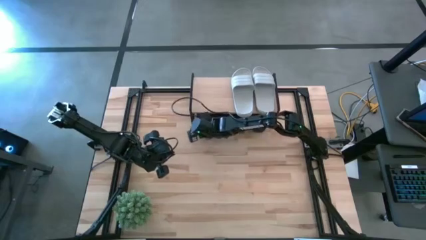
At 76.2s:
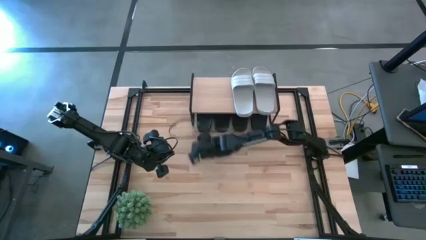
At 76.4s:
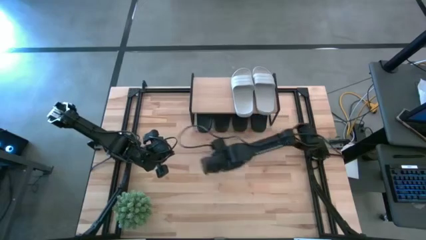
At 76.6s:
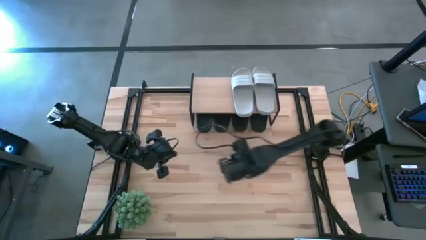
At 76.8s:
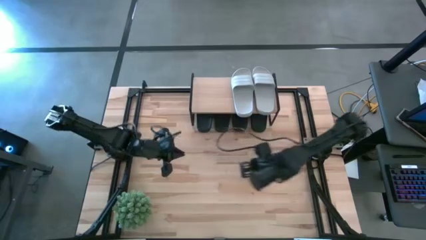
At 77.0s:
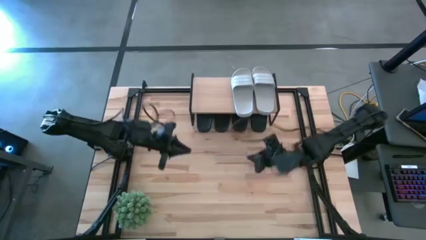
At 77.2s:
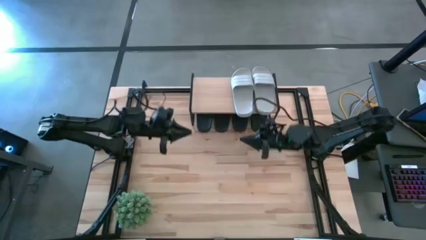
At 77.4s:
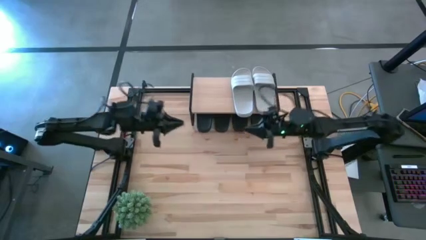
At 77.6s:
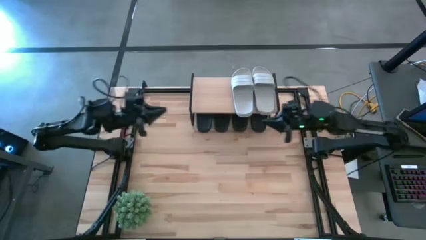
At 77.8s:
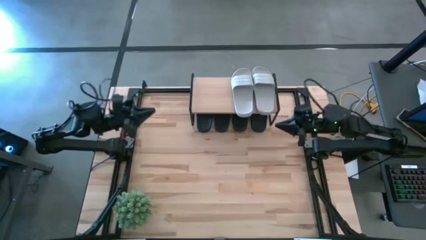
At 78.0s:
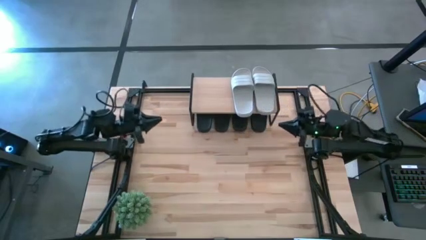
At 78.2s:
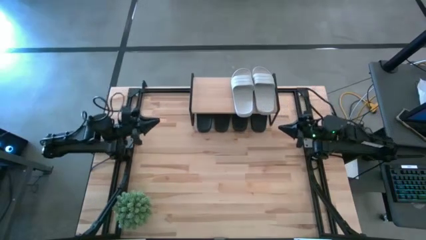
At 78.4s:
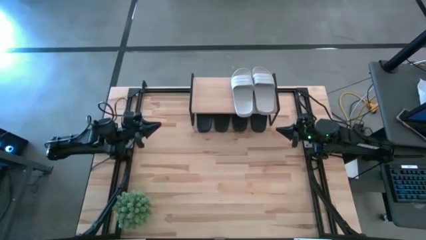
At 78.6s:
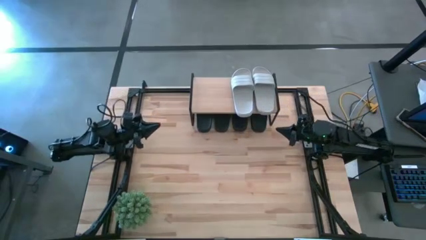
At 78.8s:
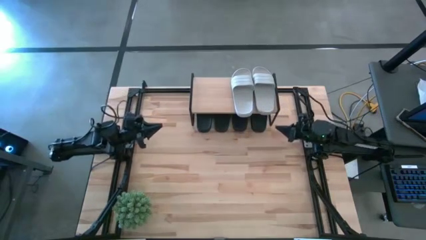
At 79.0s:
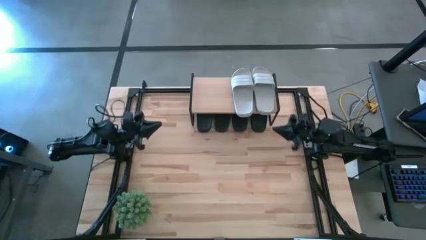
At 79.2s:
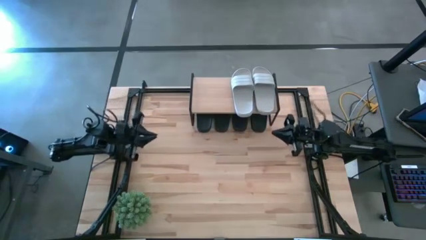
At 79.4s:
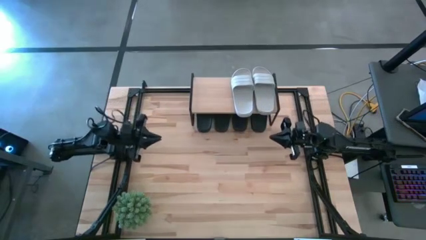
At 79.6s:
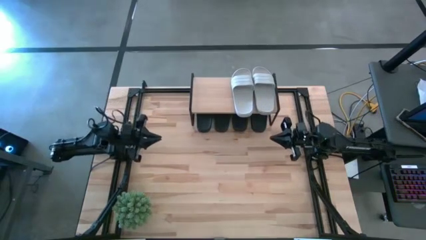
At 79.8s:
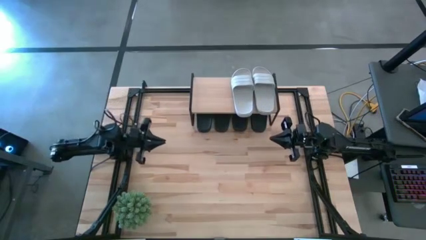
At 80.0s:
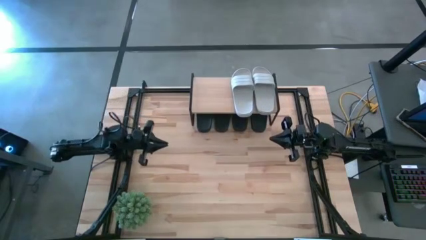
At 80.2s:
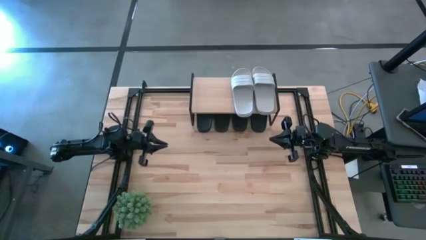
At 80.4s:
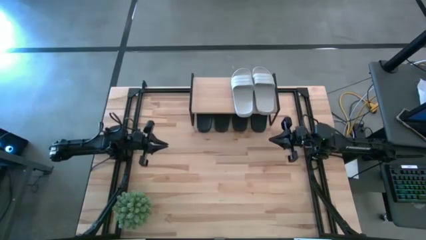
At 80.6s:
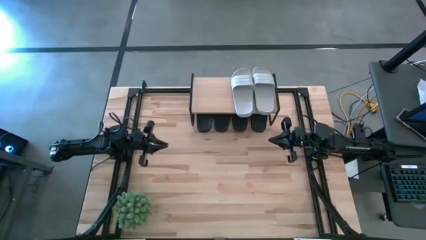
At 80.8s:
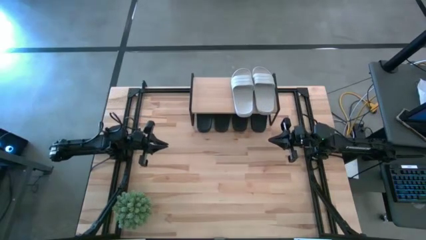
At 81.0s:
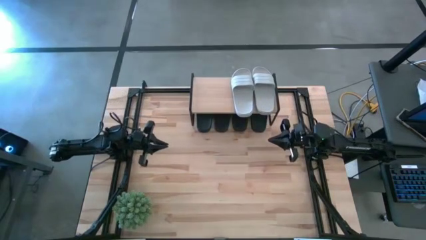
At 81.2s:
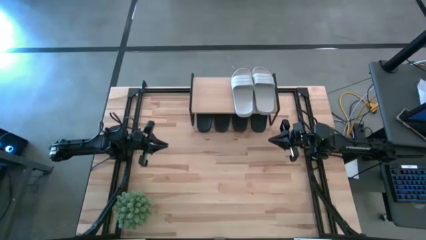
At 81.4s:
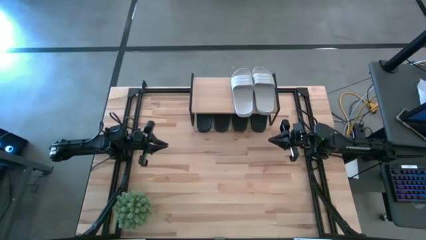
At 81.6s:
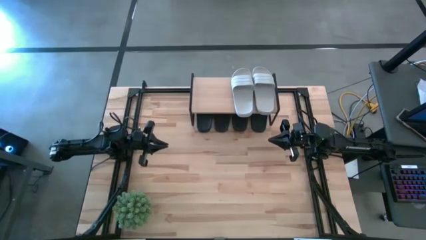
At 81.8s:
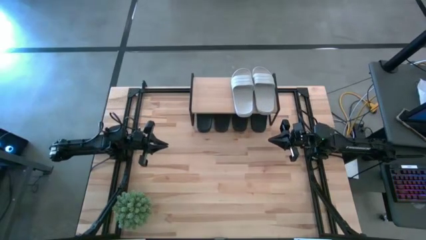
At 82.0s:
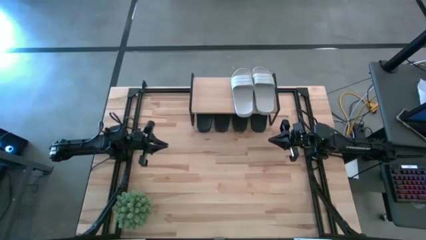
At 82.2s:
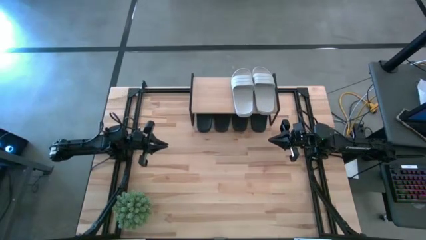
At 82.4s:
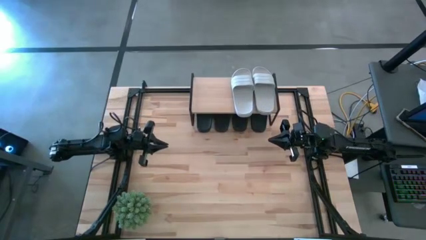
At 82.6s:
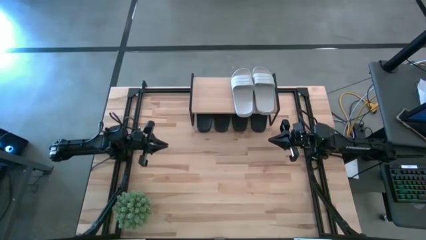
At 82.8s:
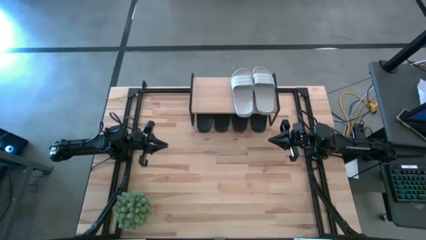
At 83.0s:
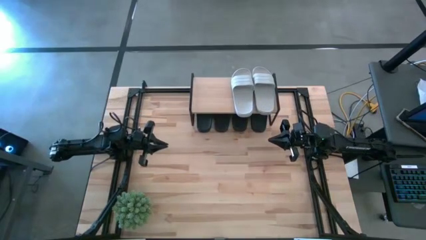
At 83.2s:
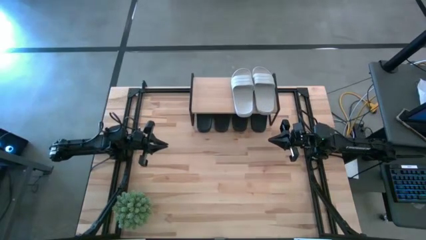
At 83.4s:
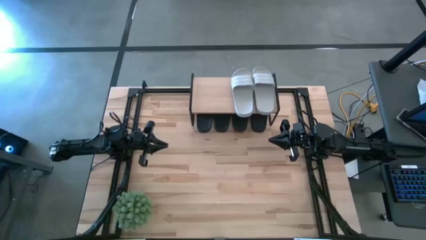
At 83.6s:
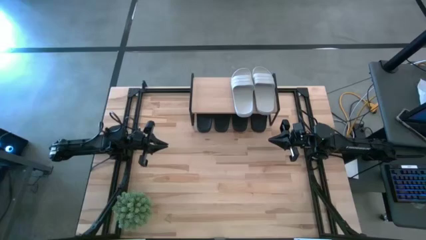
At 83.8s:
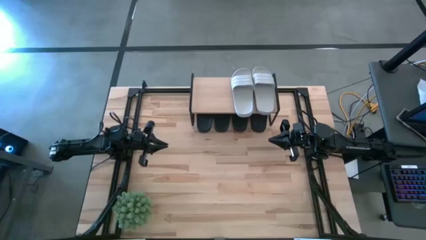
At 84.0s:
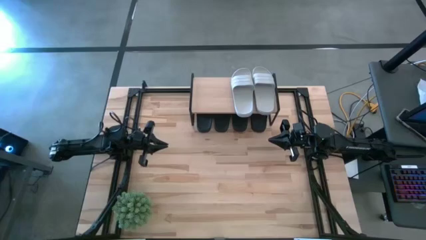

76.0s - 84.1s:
Task: Pick and place slides into the shelf
Return to Home Position

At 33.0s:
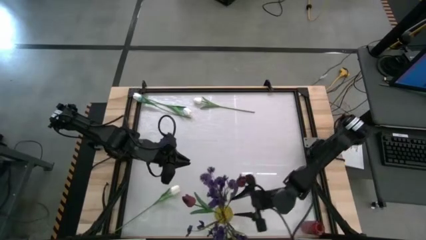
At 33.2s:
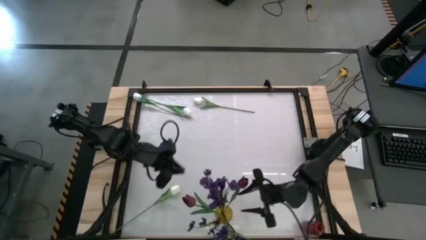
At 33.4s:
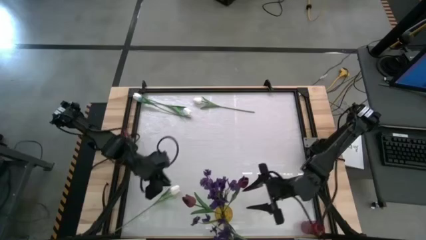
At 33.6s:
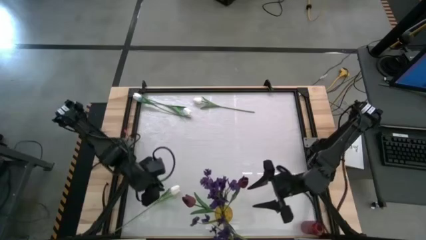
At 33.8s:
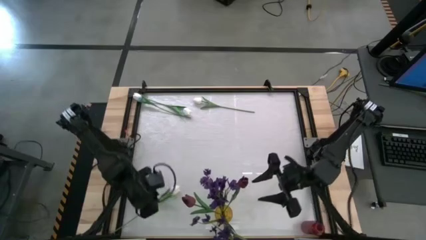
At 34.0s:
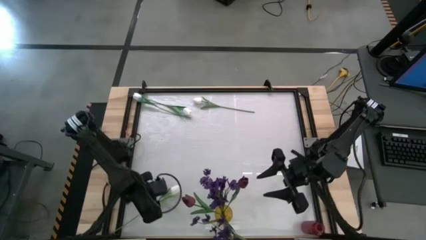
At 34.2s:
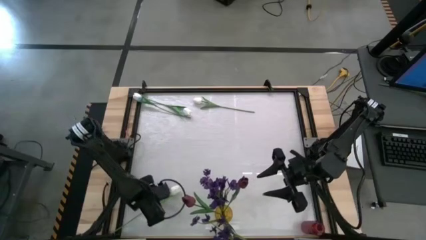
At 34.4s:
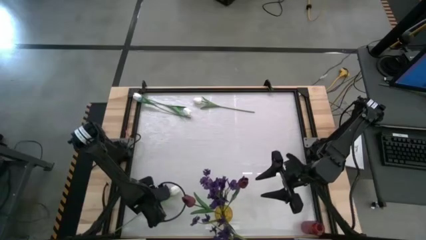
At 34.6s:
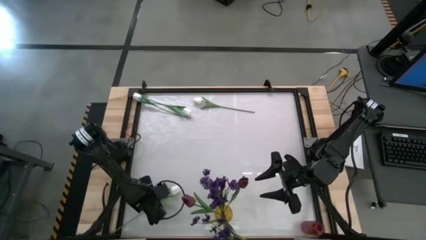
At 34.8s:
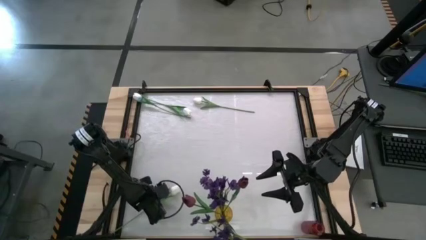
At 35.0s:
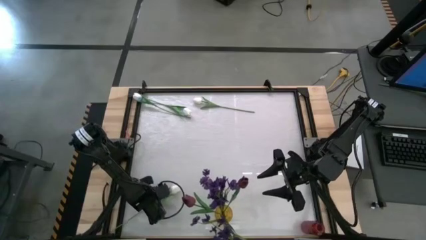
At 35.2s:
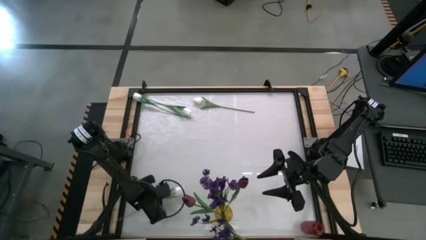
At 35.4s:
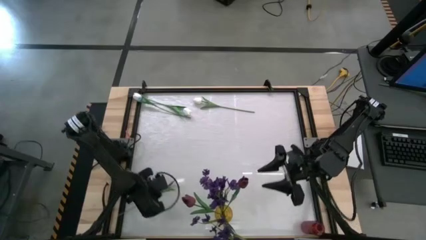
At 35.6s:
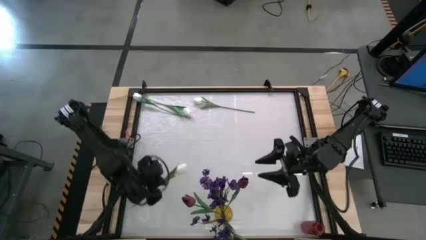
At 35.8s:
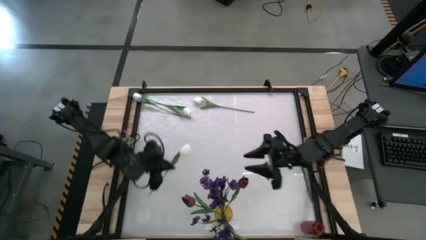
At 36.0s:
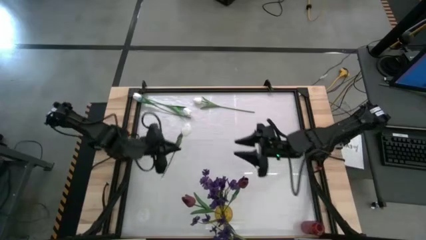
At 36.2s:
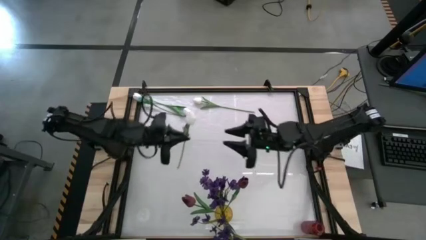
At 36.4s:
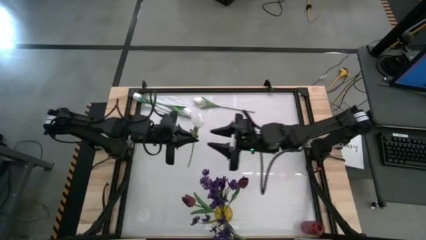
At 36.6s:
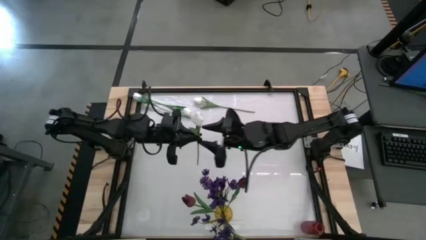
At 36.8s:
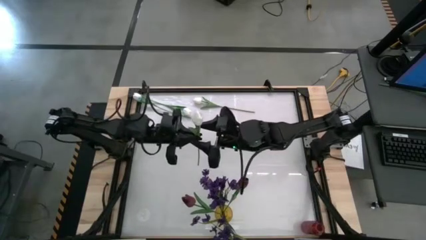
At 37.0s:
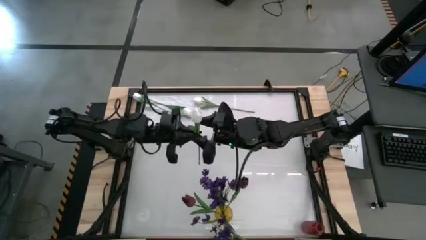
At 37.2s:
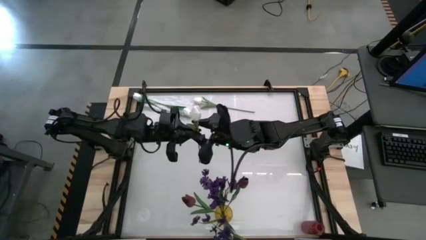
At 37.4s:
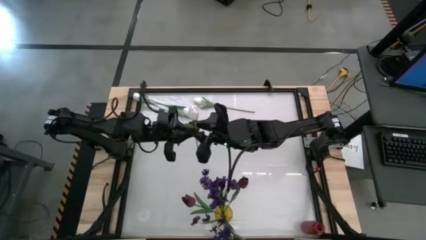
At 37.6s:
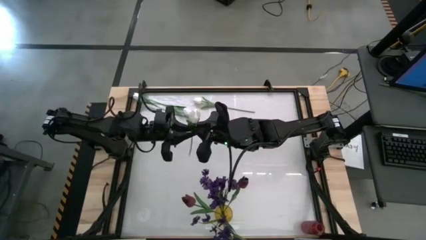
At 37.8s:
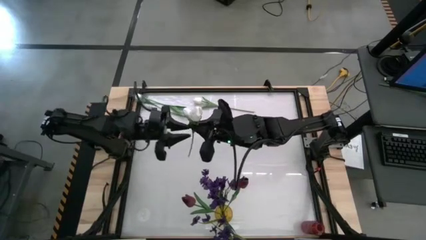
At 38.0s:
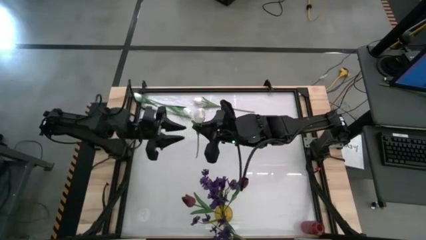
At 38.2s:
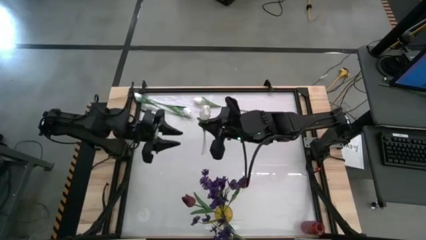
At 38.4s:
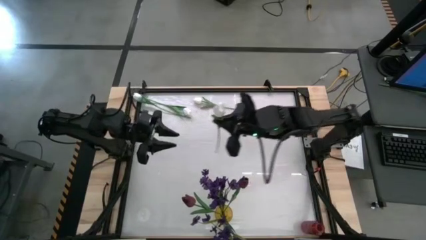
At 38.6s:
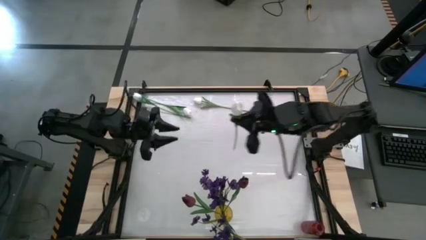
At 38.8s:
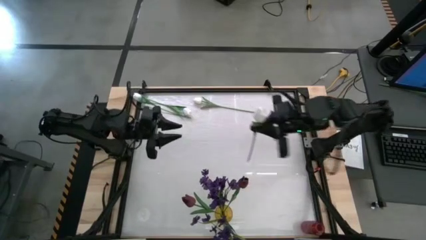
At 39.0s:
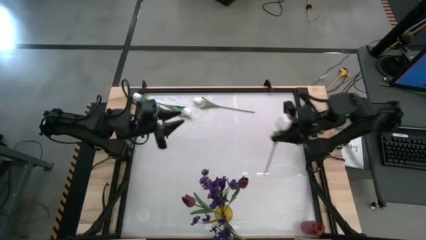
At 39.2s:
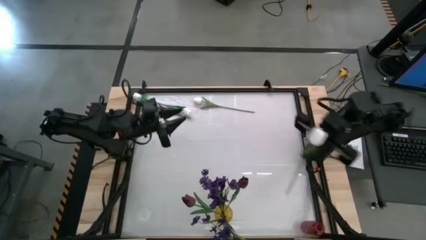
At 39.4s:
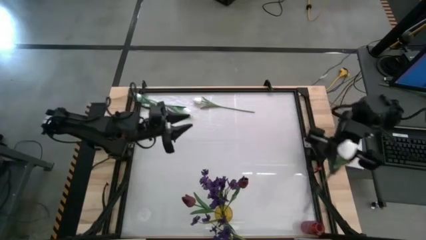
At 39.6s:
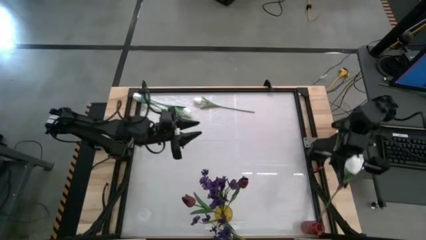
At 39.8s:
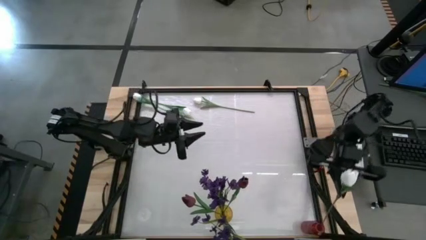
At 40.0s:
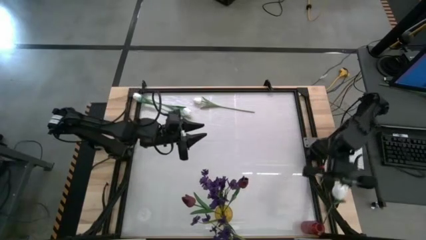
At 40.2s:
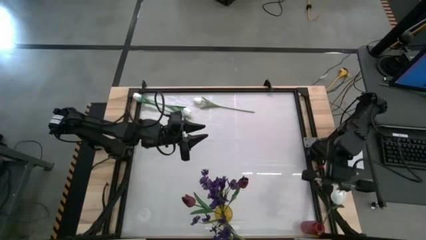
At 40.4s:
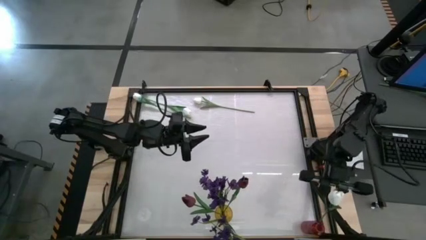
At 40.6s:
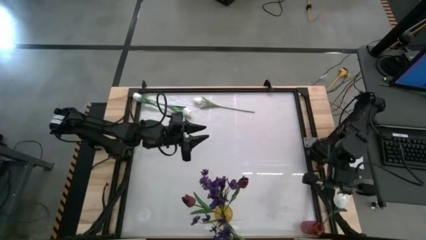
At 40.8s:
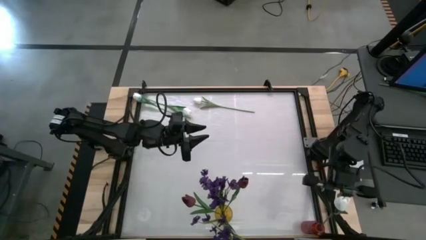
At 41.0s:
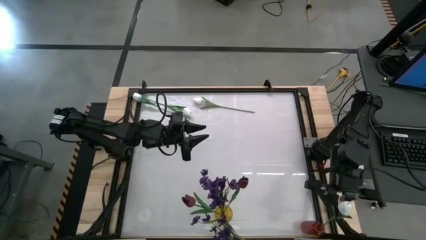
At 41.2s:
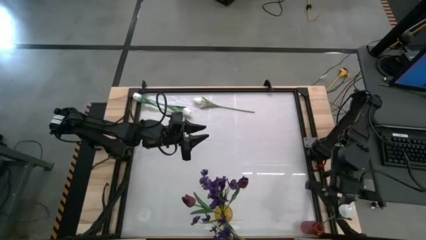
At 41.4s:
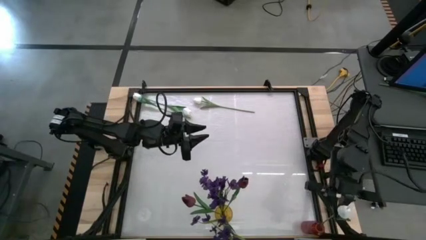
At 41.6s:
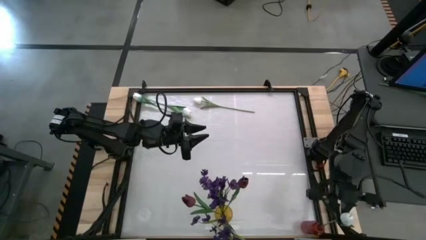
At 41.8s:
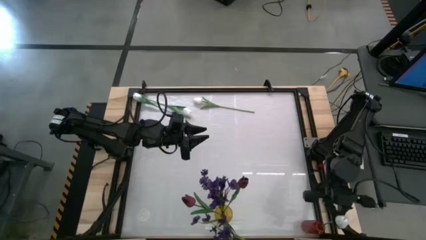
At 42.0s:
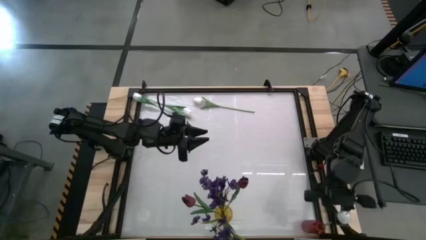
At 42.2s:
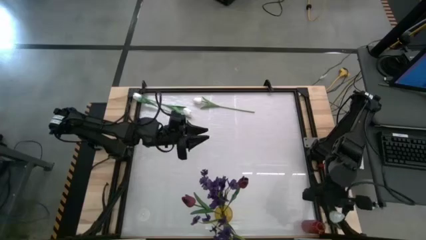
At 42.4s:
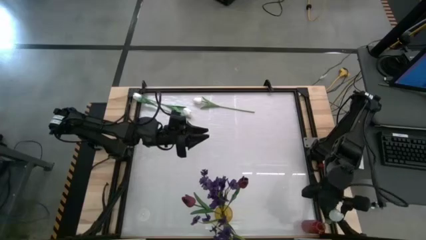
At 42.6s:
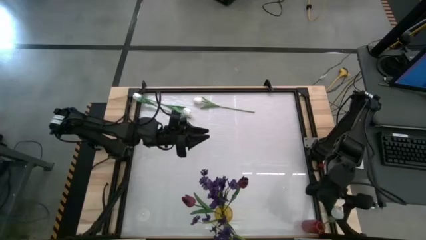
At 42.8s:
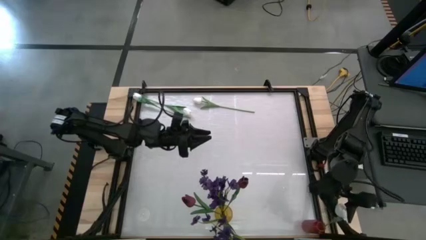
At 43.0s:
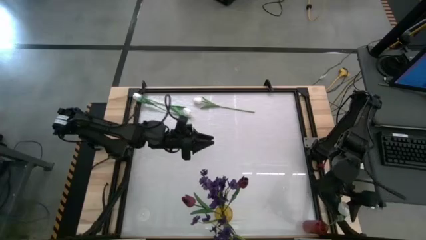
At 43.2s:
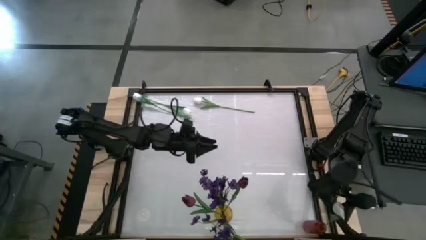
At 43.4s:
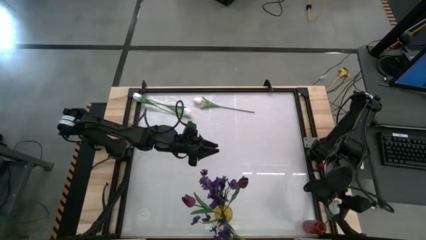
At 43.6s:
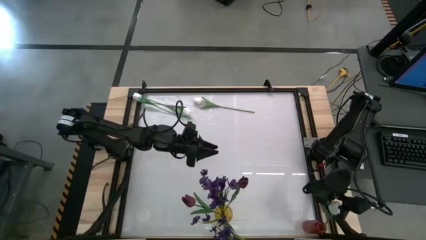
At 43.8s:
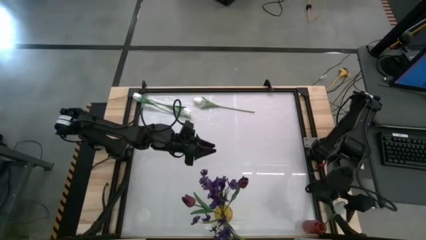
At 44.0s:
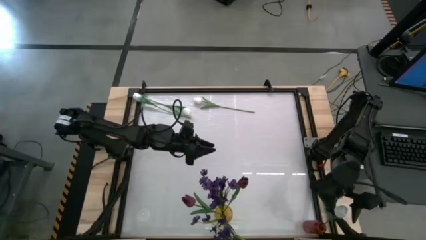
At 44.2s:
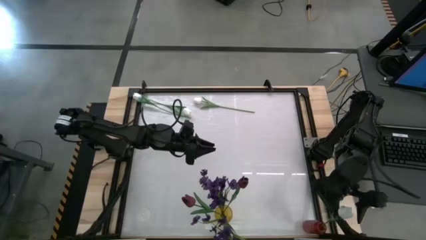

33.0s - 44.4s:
Task: Sort flowers into vase by color
Put the white flower into the red vase
